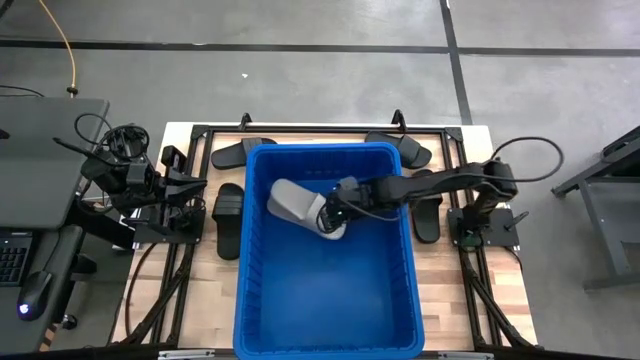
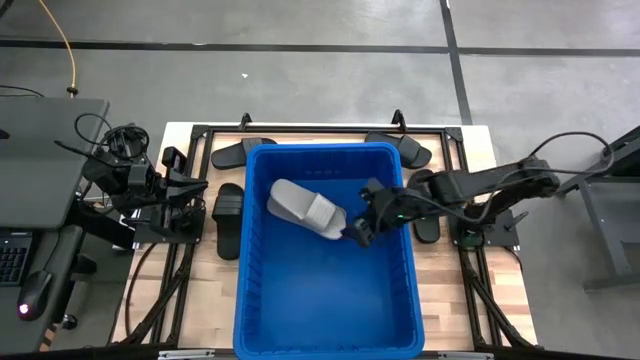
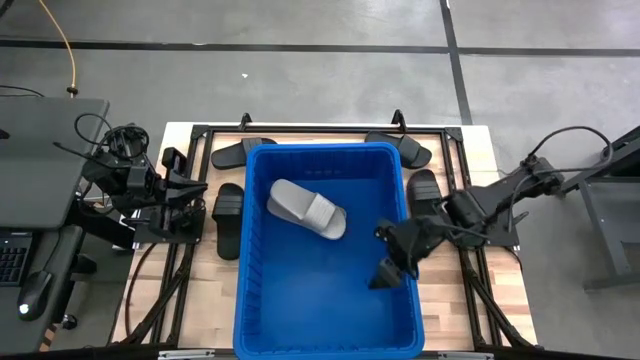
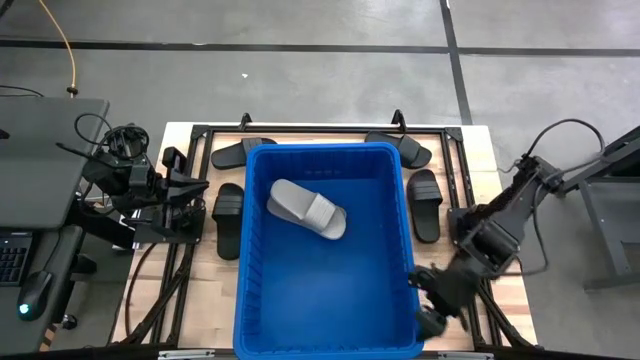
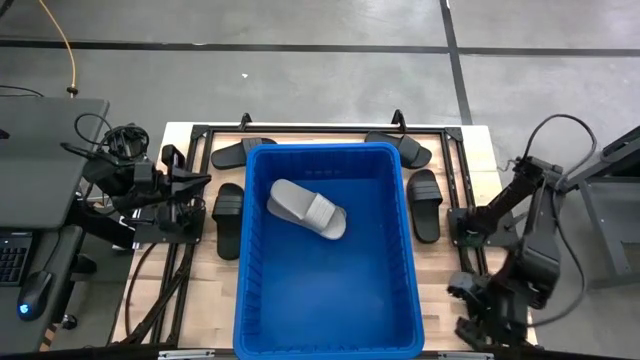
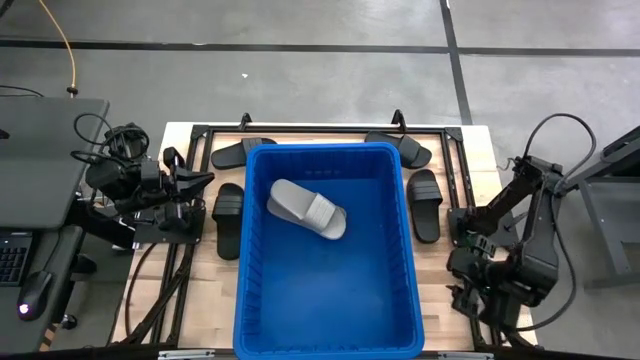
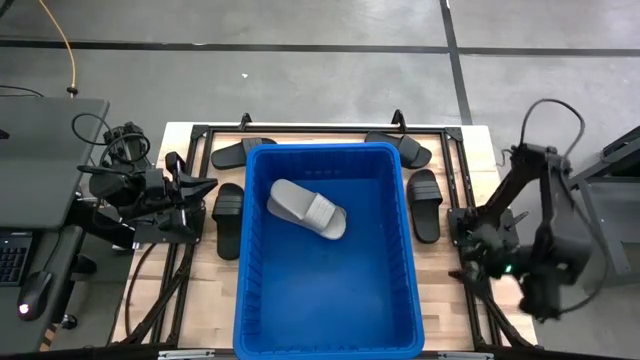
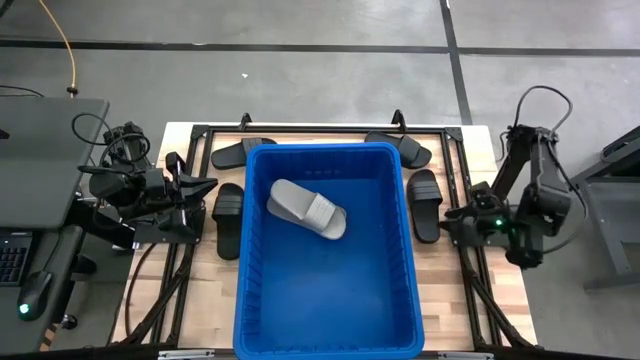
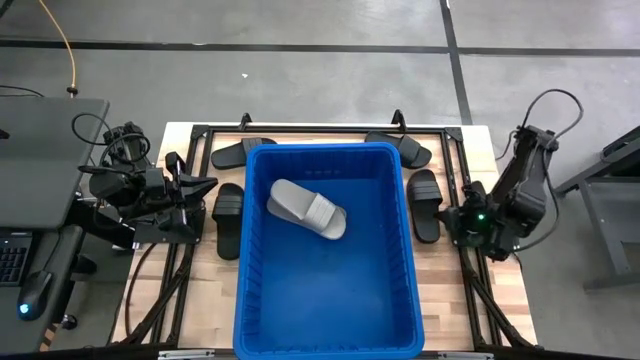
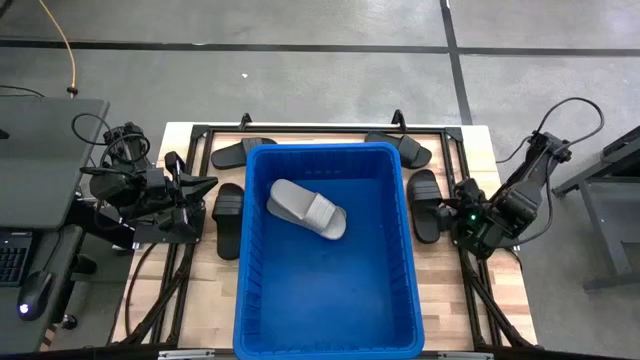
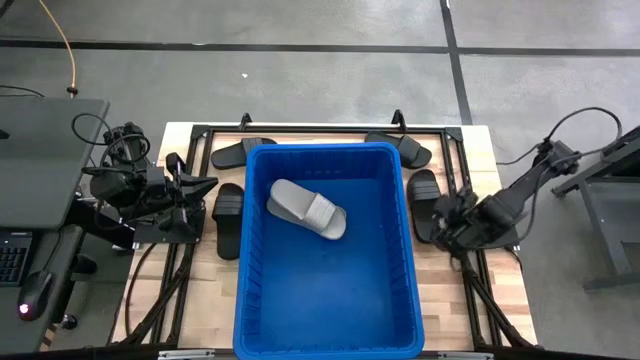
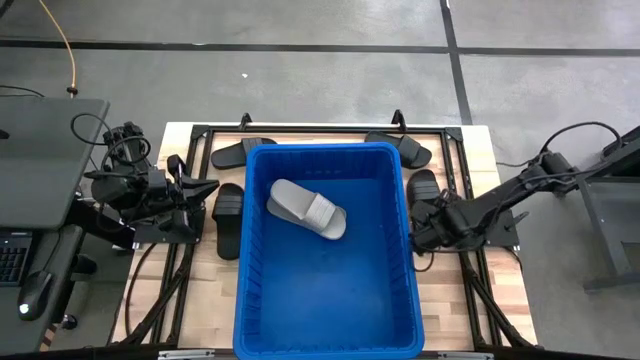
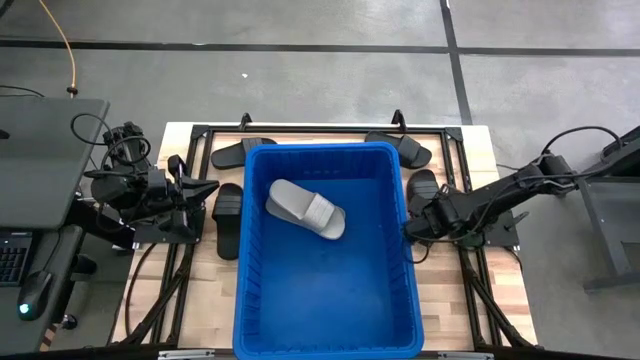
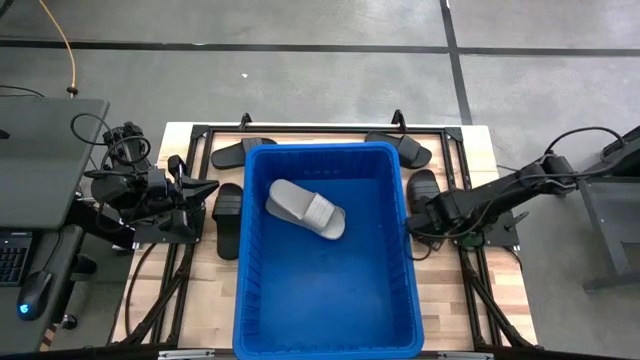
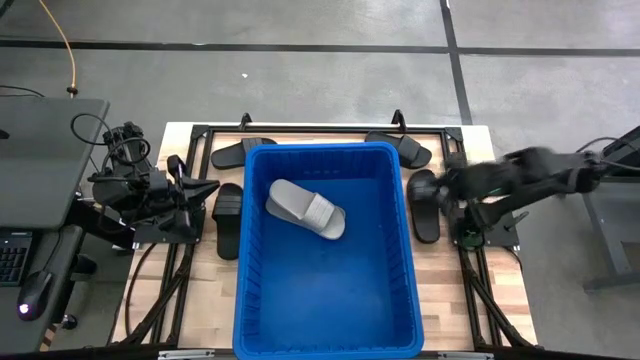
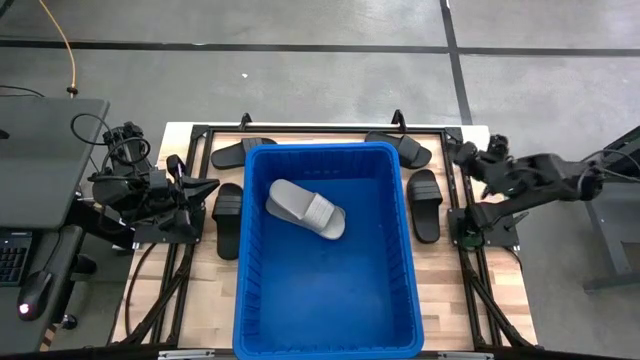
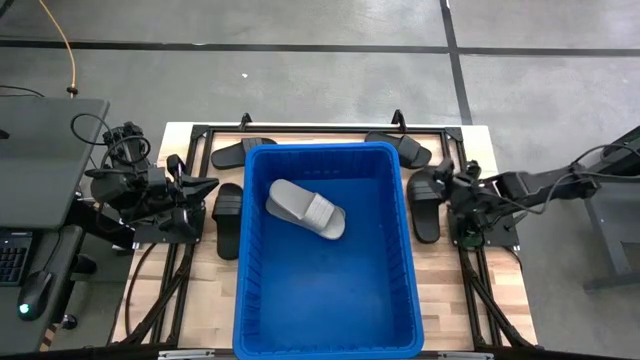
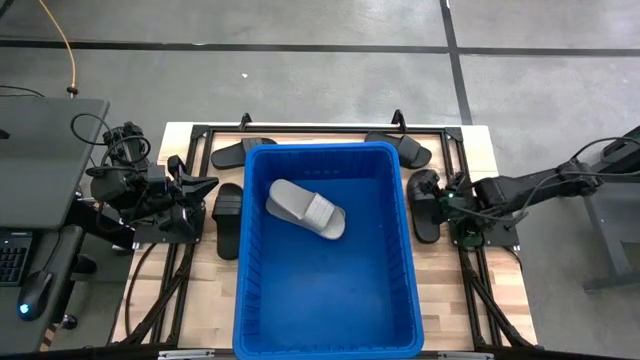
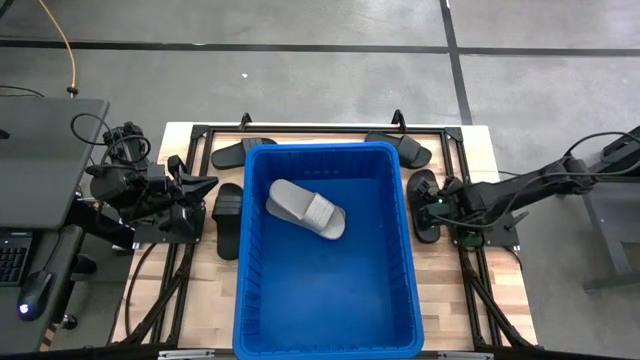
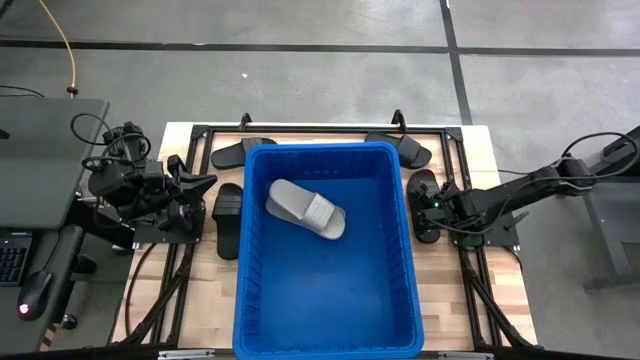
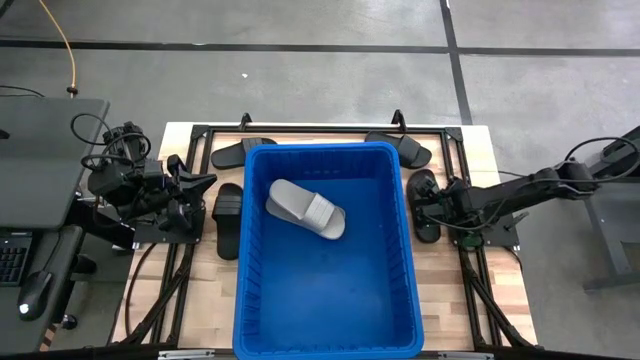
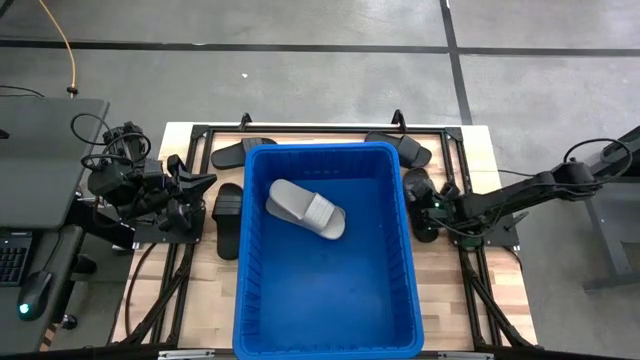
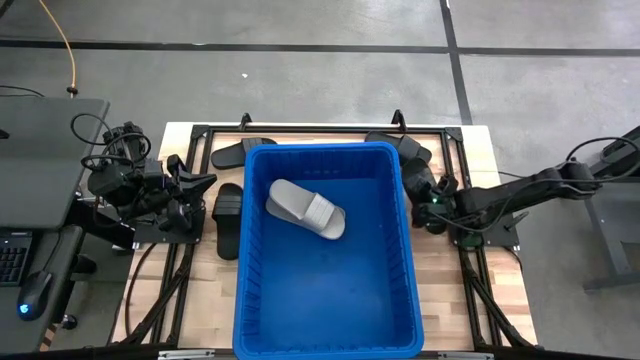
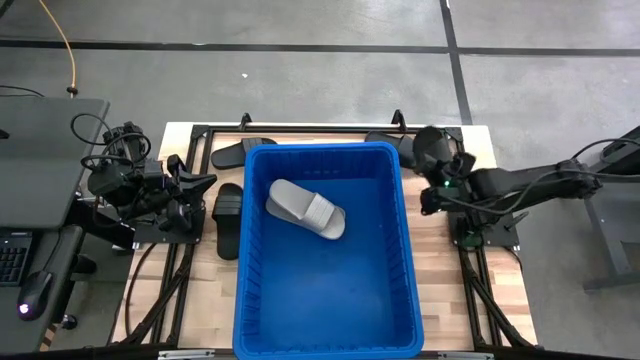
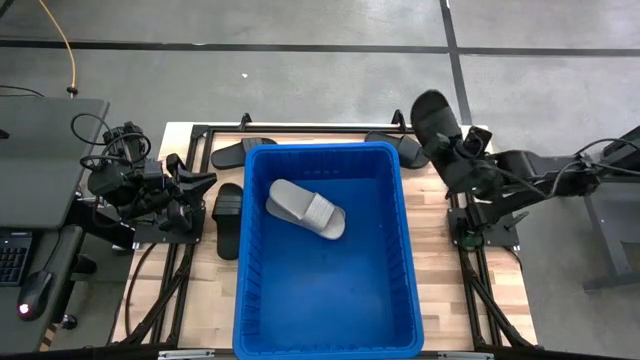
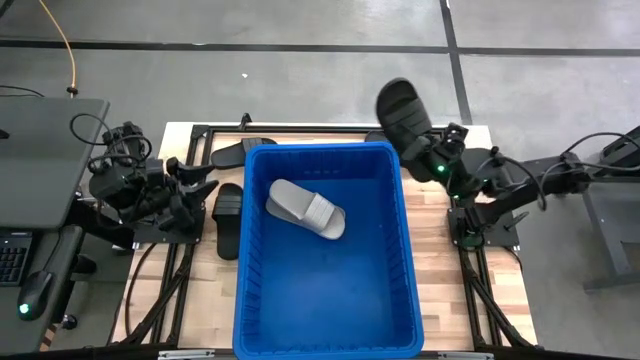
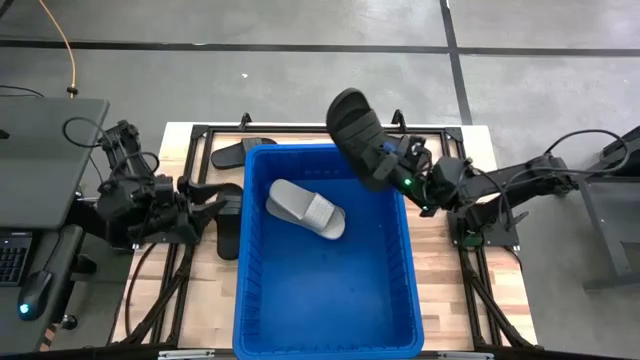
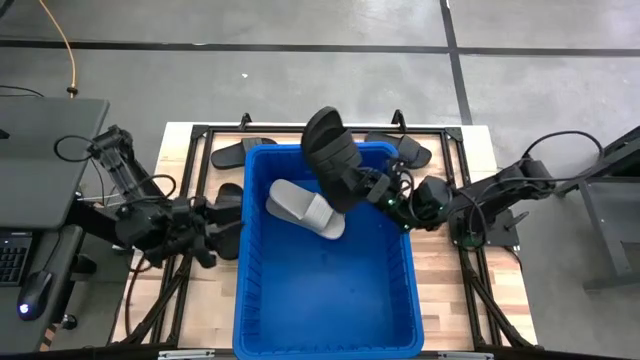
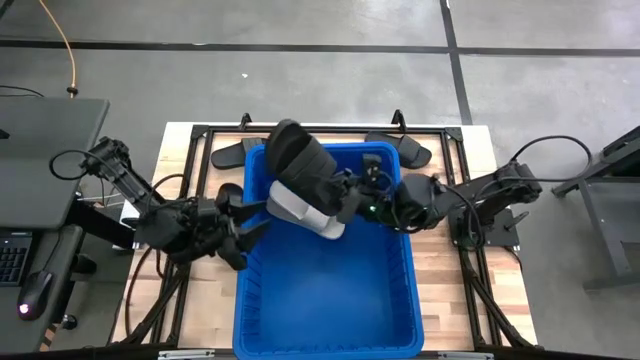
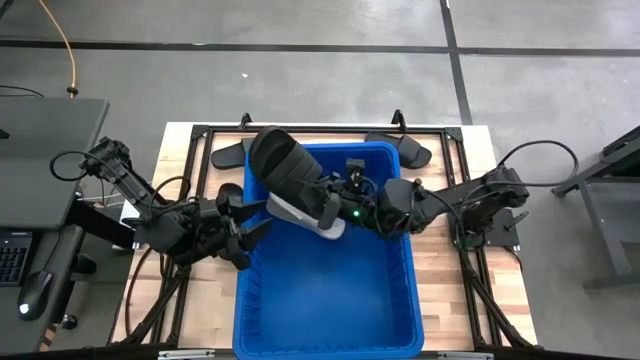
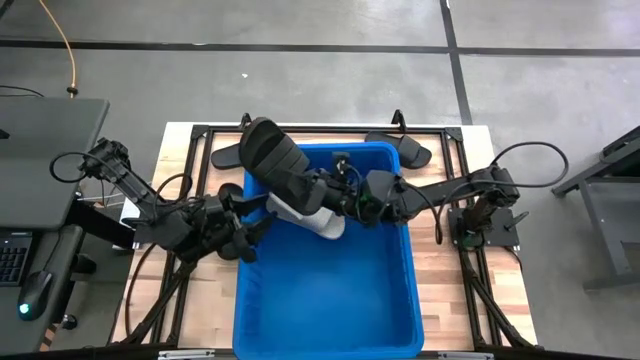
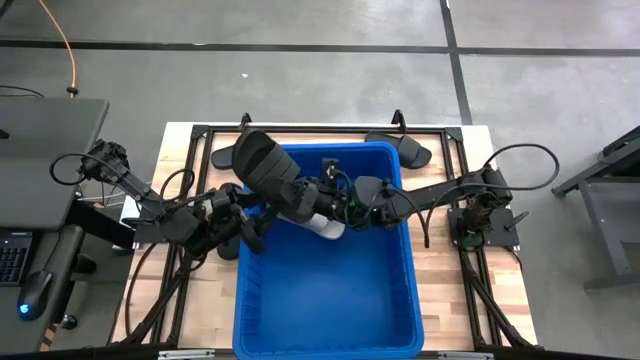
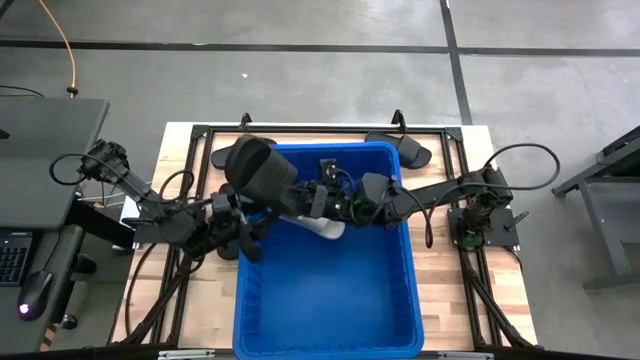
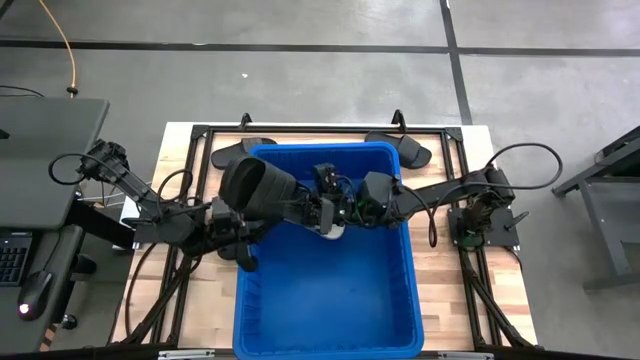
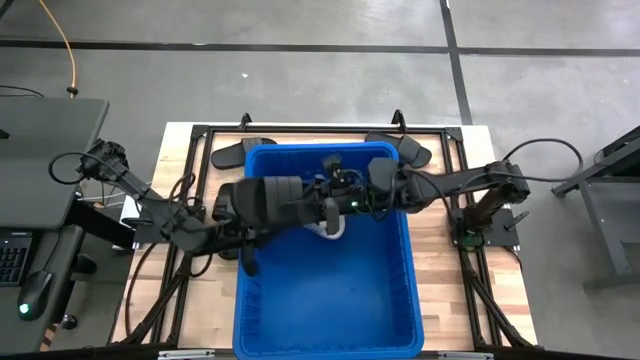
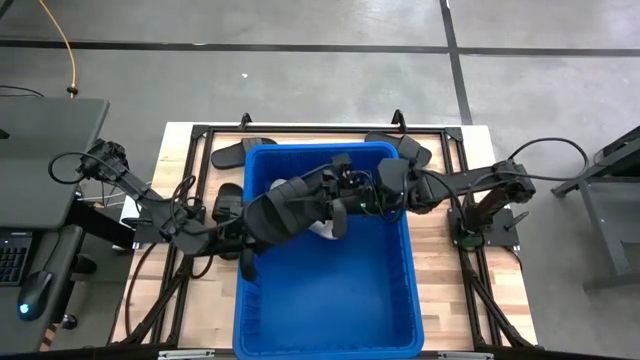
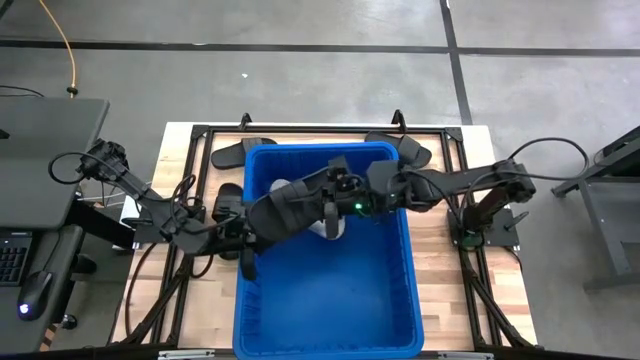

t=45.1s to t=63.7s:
Task: Pick and place slides into bin
Put the bottom right black slipper into the blue bin

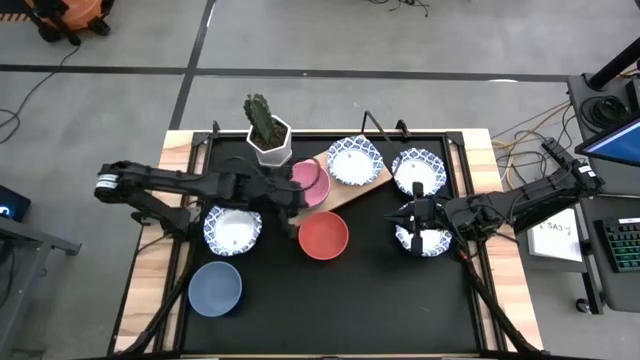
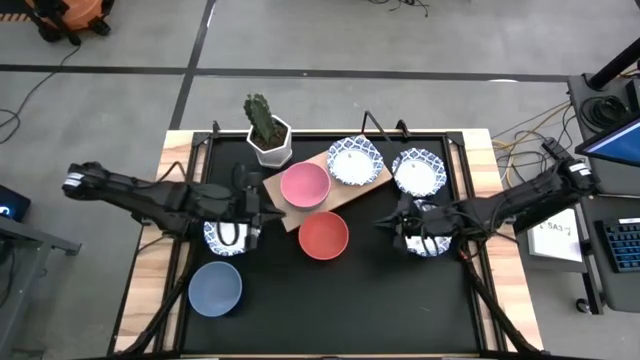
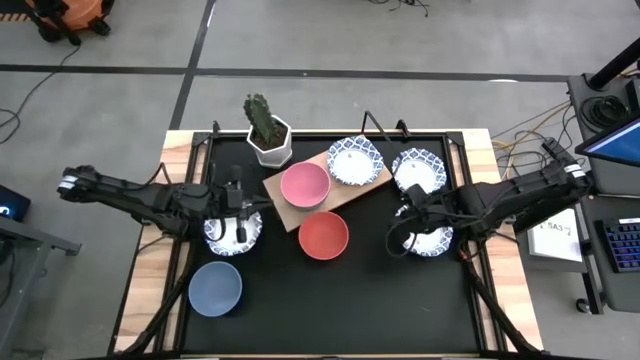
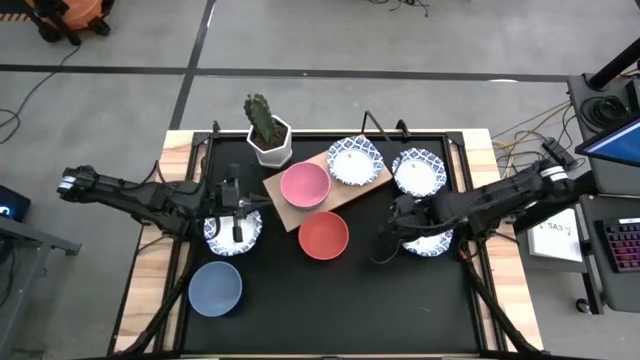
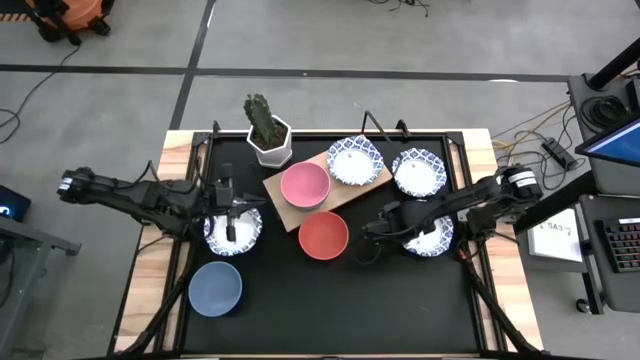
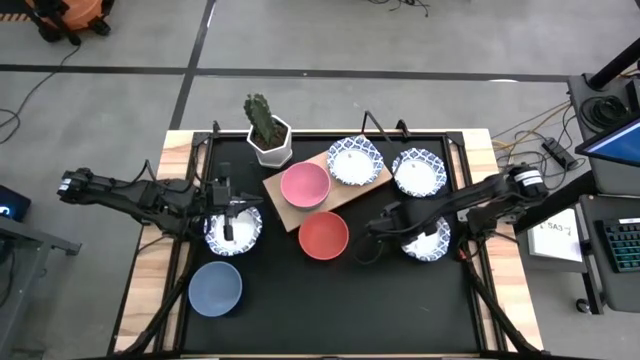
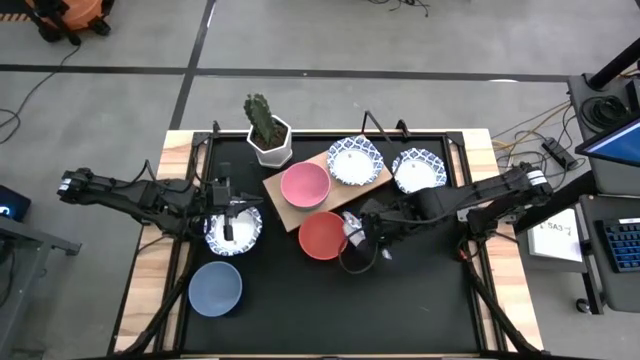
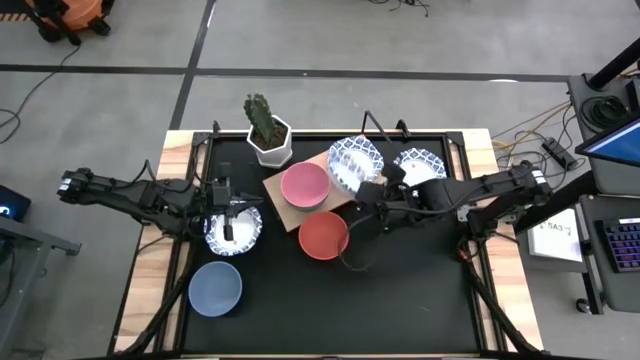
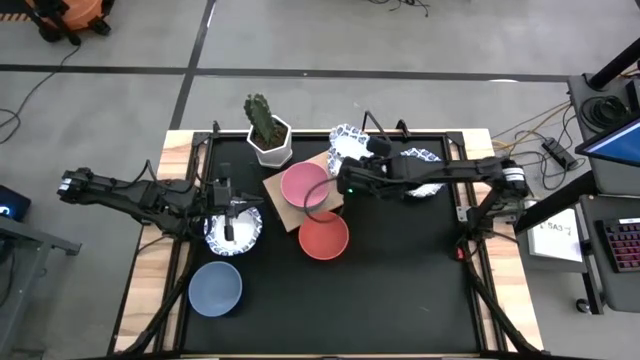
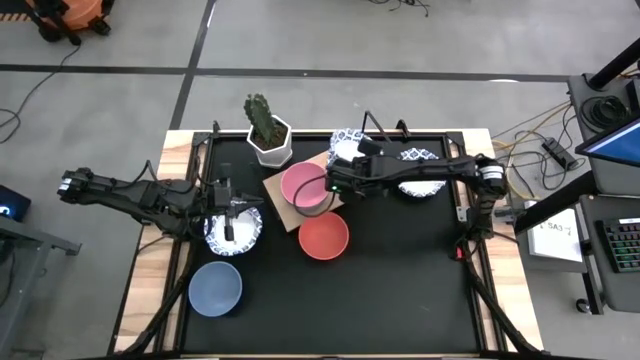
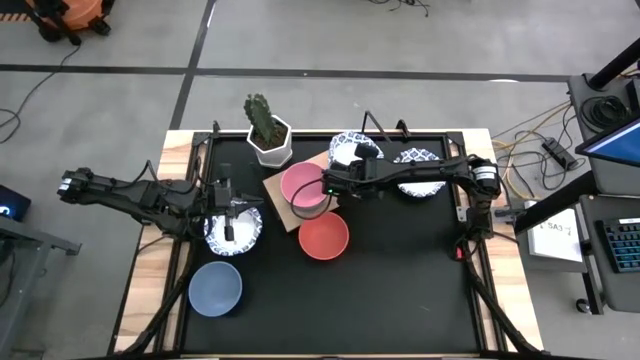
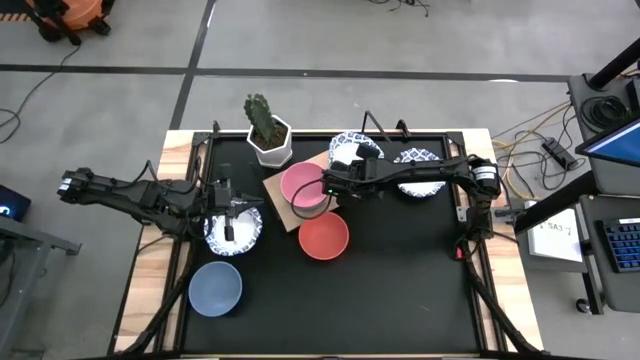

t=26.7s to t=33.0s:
Task: Place and stack bowls onto a shelf
Stack the white bowl on top of the white bowl on the shelf
